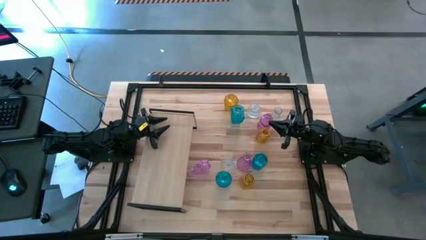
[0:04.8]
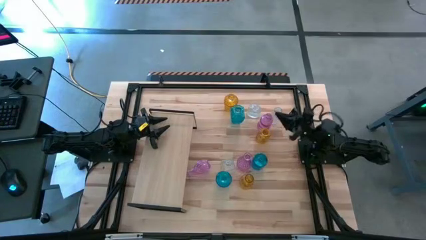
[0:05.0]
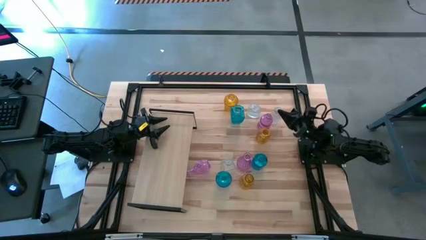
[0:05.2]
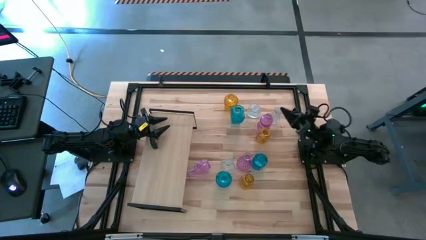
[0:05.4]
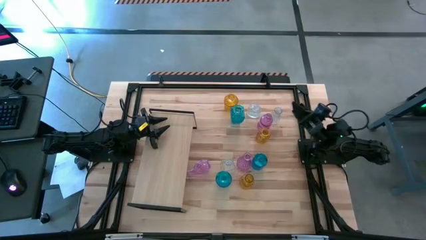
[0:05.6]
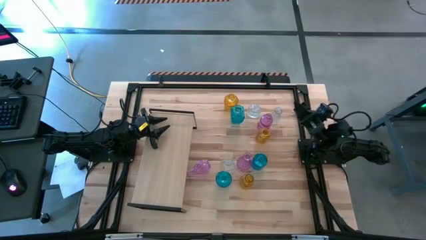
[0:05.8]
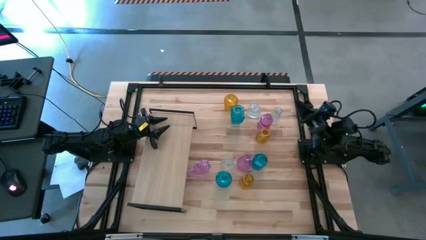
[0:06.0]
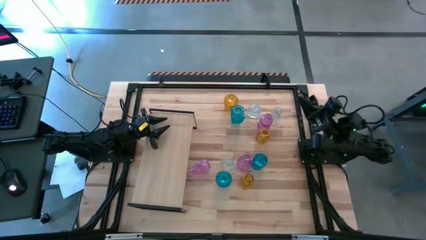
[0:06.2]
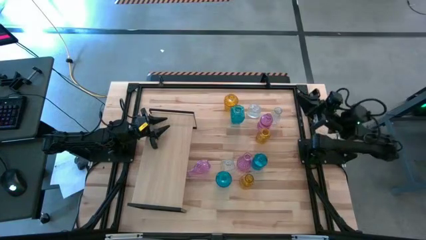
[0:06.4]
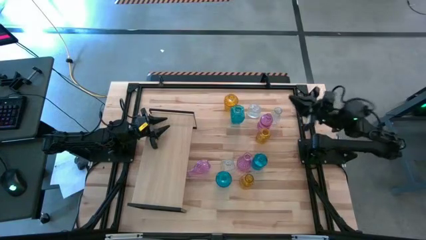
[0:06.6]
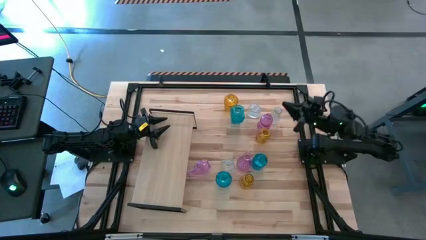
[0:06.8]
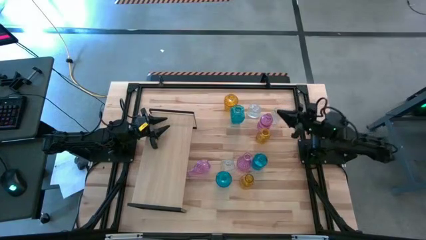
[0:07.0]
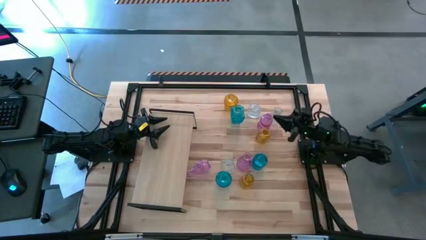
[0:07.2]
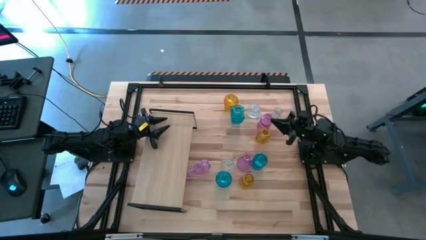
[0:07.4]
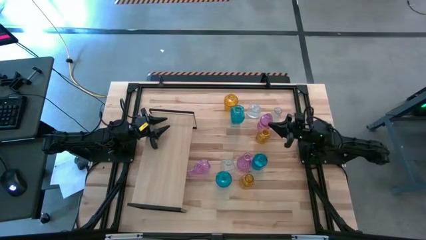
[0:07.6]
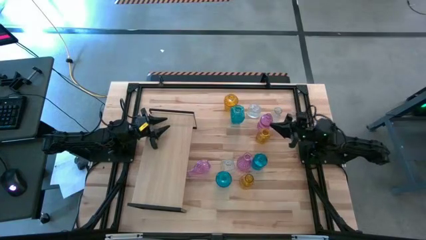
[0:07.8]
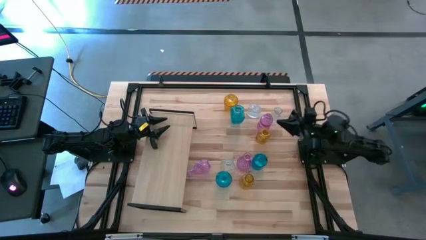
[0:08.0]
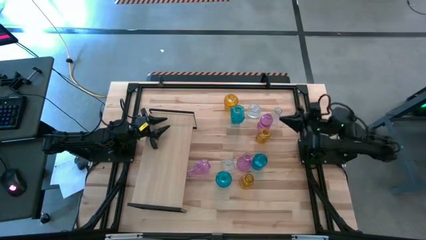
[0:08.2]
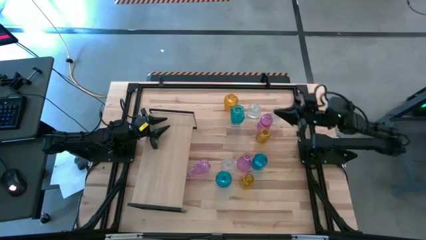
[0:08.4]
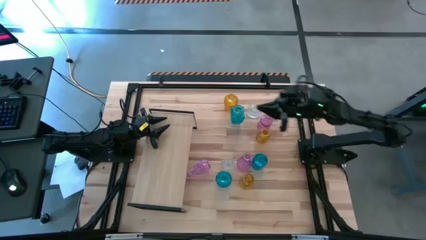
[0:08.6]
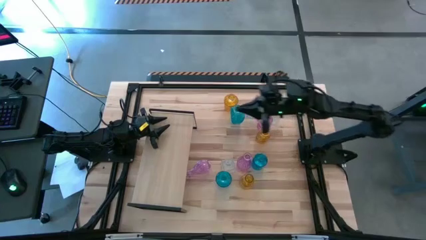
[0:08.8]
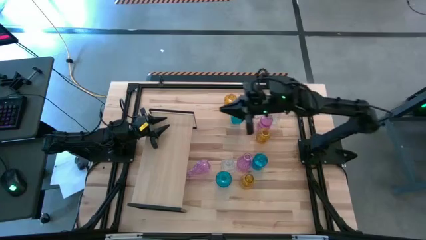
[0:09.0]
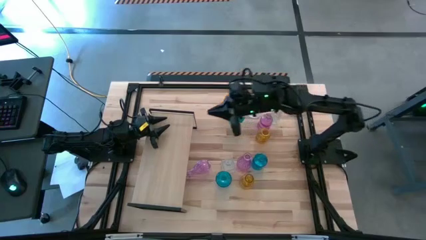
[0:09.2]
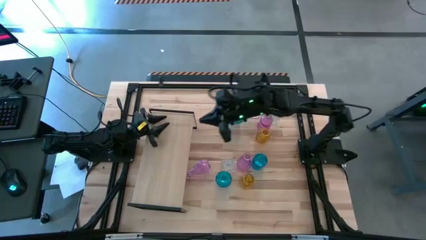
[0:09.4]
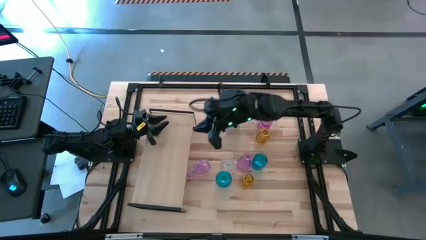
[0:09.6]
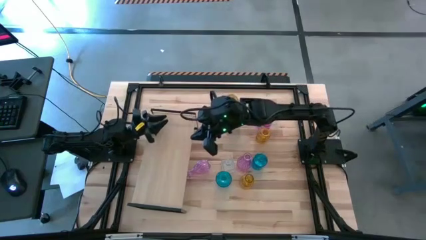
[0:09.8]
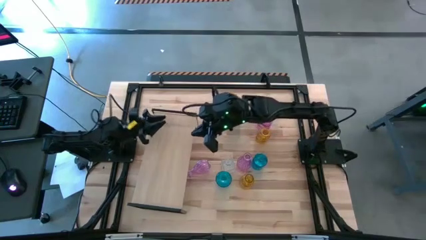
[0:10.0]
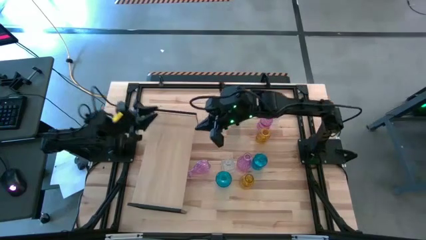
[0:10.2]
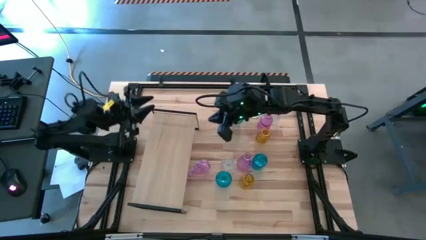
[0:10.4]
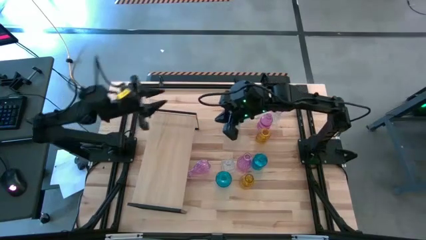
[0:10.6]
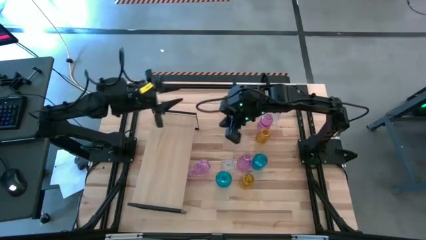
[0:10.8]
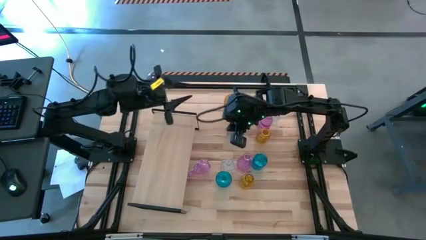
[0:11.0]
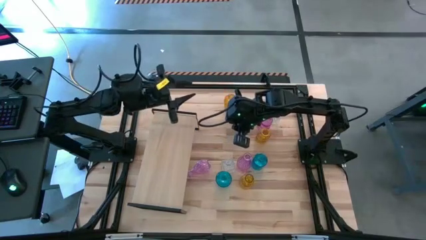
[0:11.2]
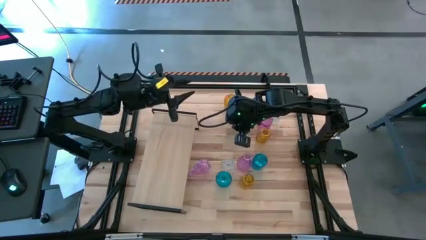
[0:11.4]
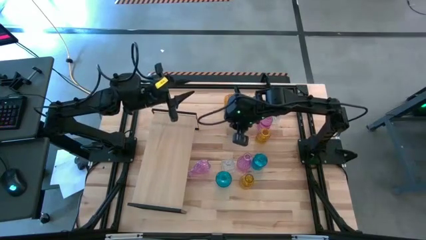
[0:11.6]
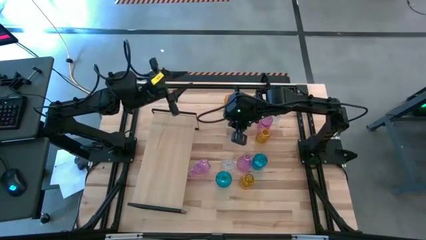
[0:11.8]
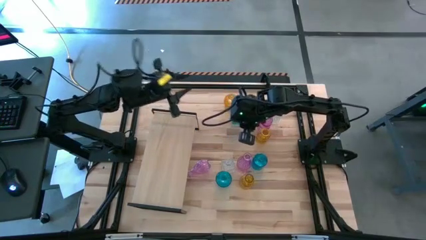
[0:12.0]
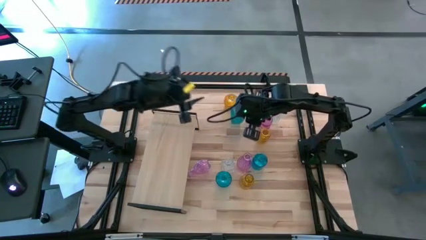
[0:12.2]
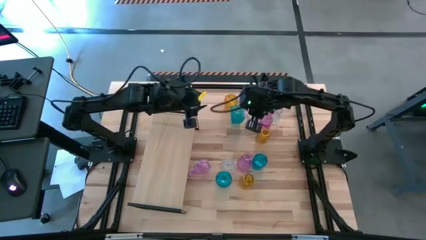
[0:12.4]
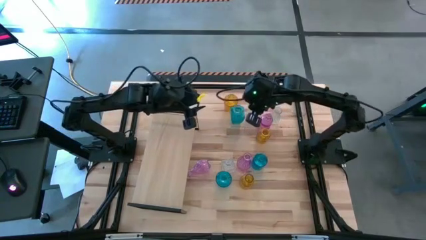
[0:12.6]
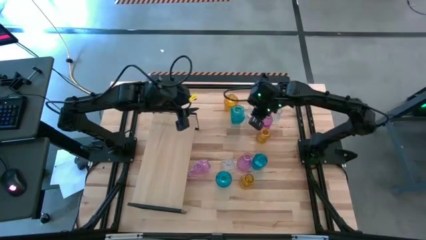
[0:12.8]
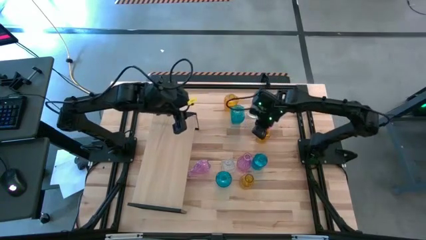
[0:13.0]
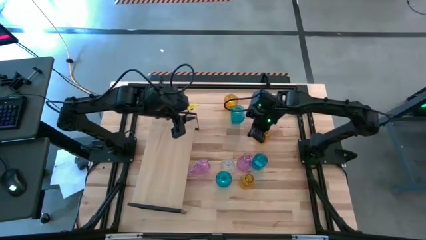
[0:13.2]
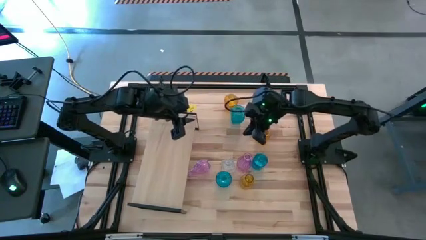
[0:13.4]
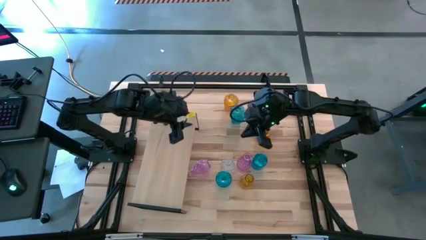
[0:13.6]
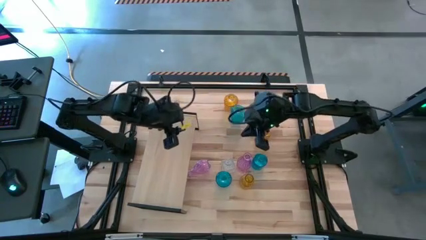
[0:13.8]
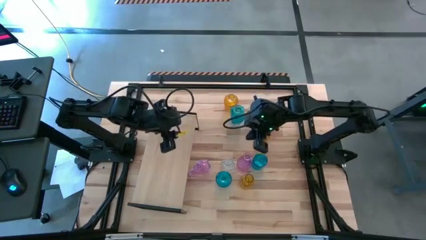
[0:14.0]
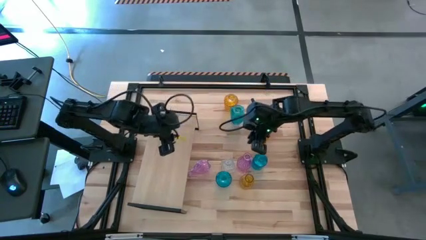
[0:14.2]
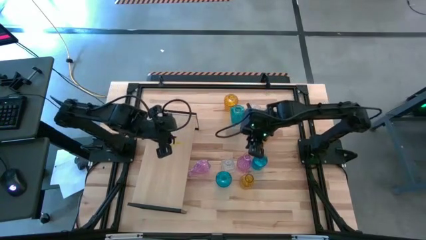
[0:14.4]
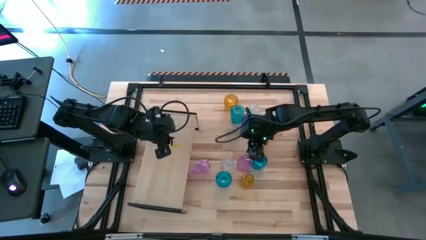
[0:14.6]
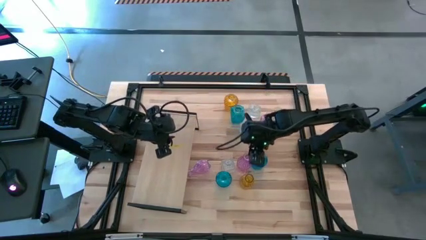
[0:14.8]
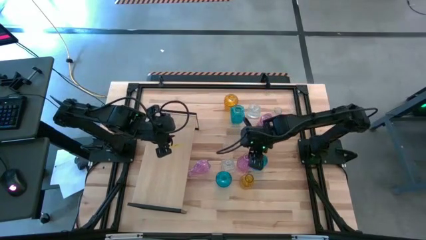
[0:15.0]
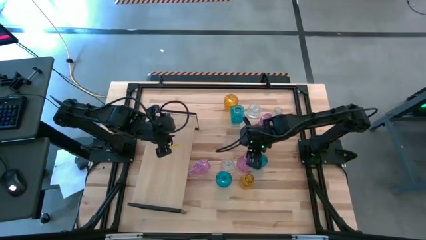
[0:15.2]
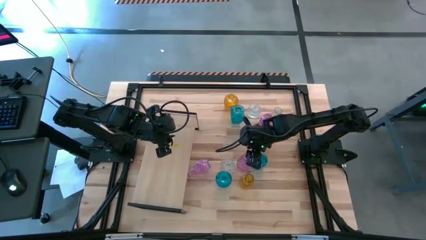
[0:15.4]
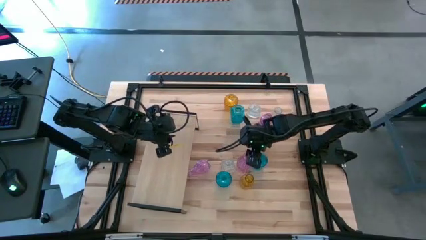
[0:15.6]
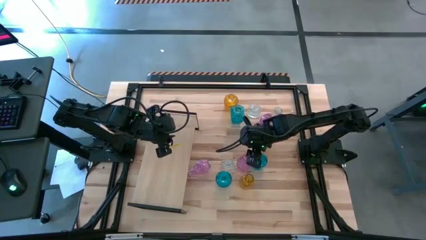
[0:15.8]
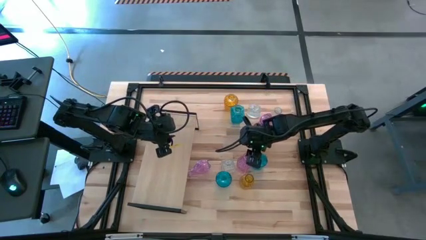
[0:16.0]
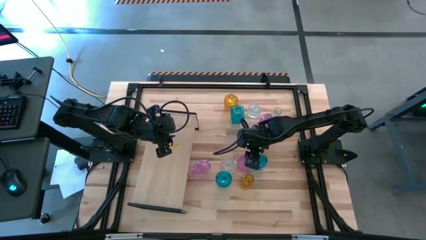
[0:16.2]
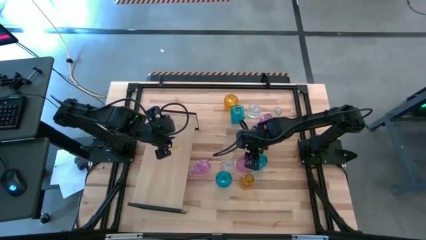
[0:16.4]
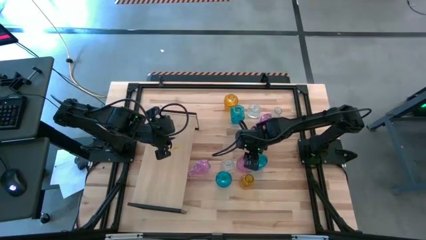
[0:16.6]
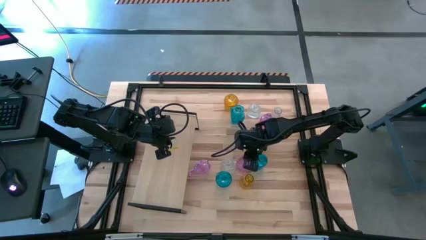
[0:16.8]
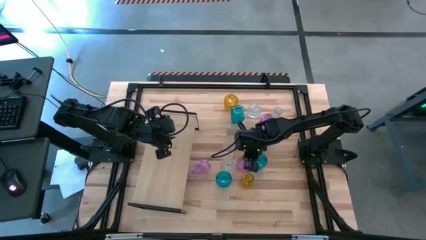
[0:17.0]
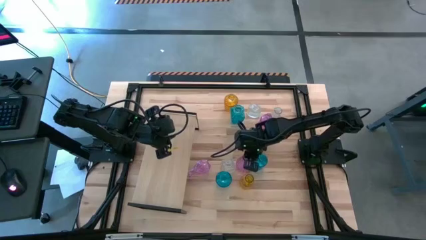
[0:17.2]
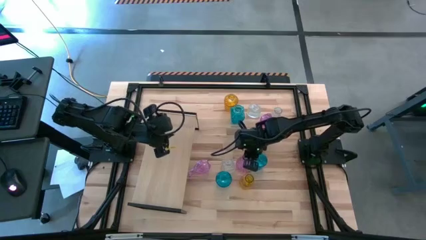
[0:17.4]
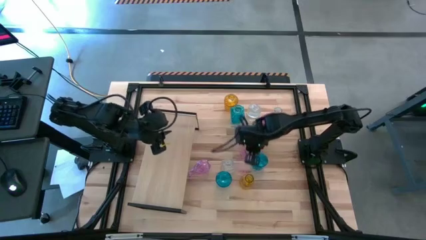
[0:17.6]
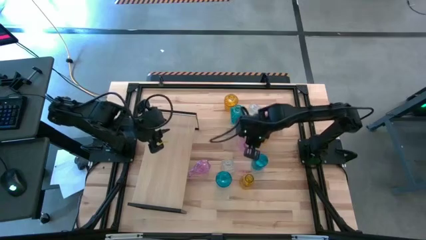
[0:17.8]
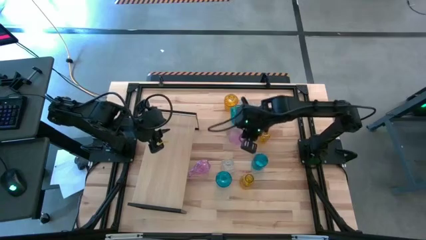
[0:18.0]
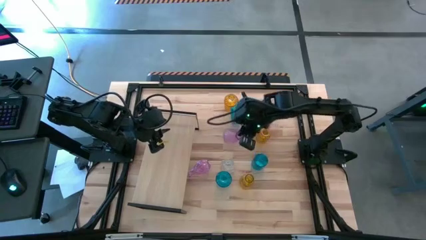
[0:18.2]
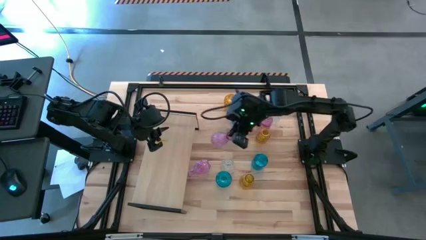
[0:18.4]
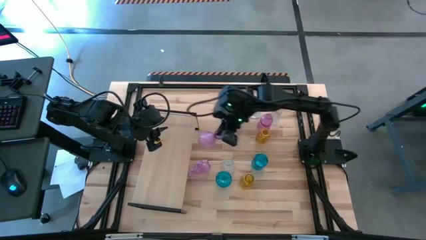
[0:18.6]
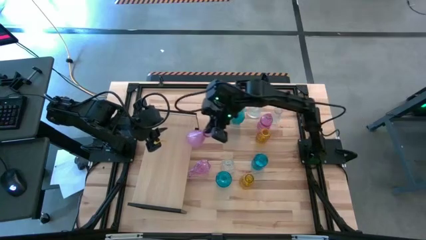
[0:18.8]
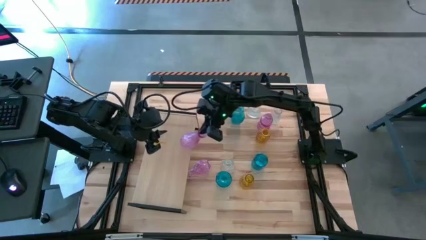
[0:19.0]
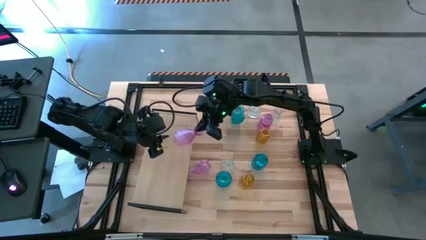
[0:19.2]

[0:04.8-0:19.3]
Task: sort vases onto shelf
Put the center violet flower vase on the shelf
